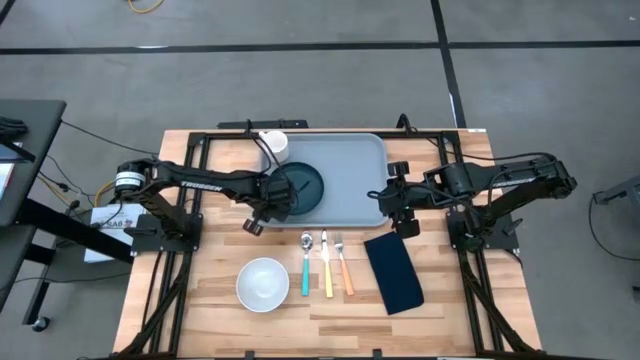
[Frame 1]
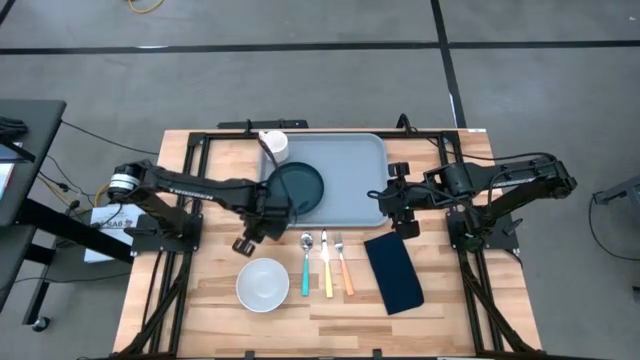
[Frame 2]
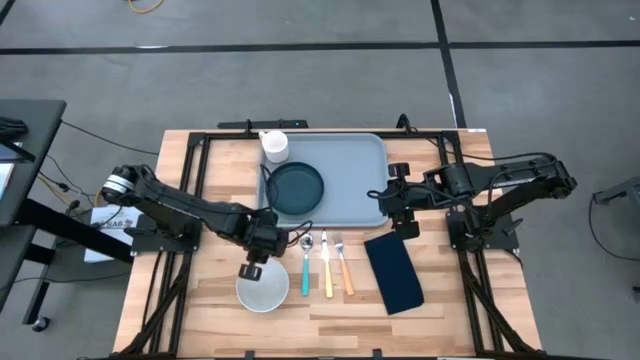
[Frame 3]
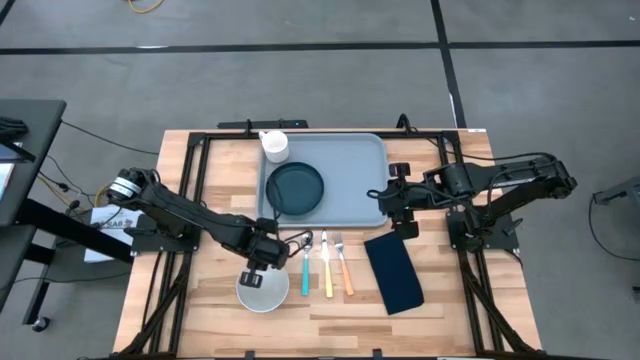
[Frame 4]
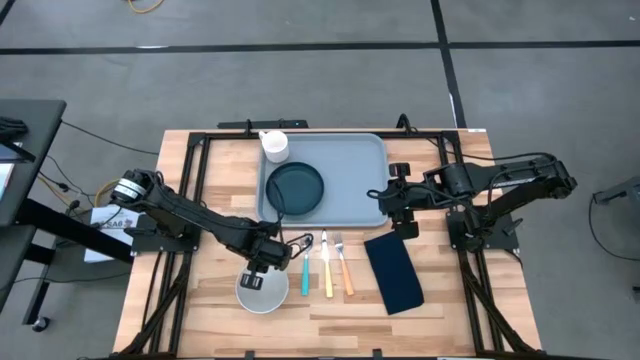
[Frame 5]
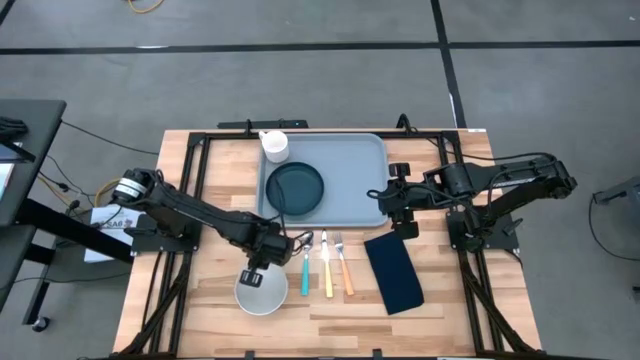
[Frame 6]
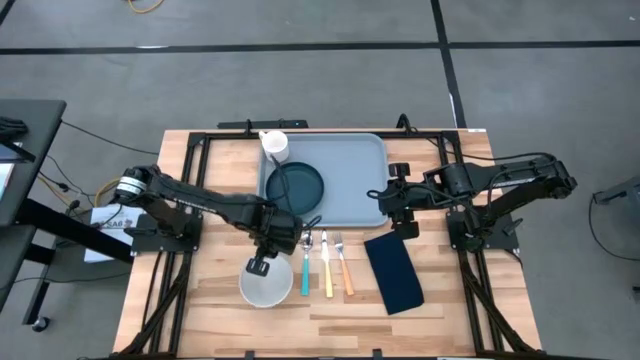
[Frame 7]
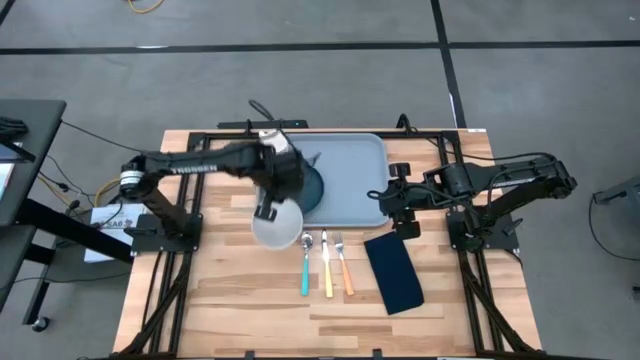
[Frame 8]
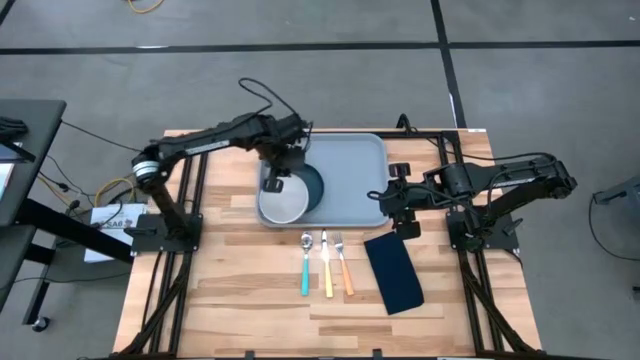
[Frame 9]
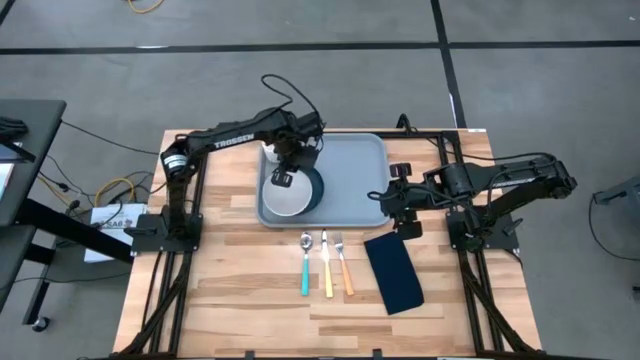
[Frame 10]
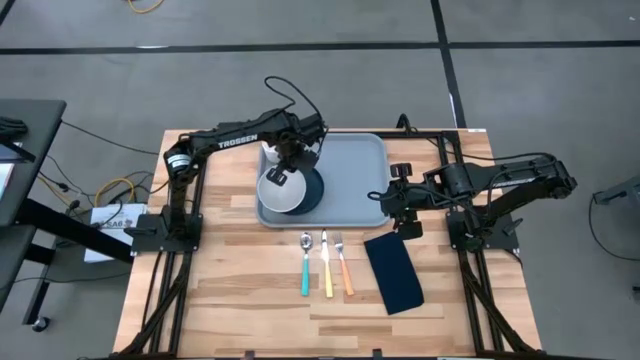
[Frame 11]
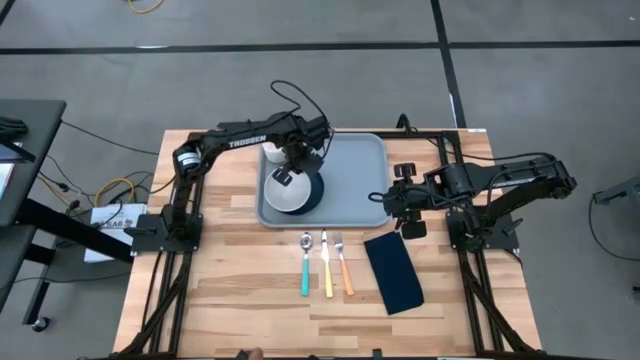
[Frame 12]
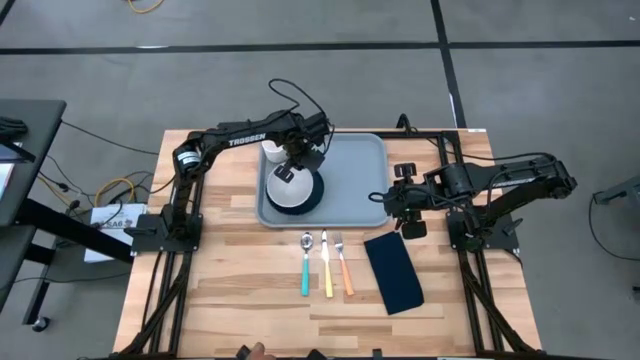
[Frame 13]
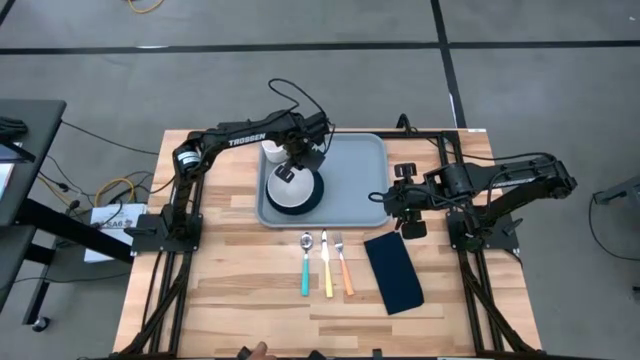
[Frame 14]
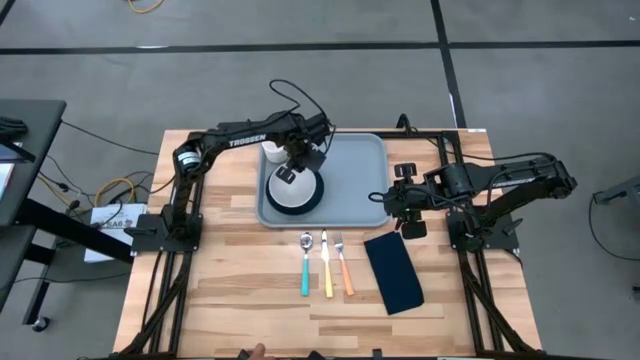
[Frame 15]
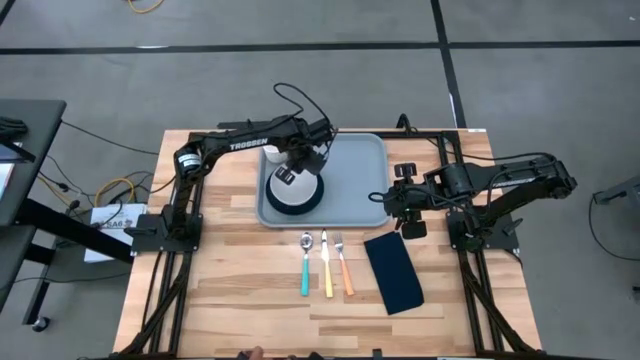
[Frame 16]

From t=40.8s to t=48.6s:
Task: Set up tray
Put the white bowl on the black plate

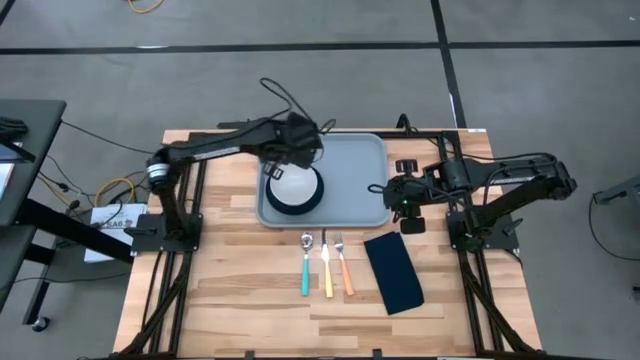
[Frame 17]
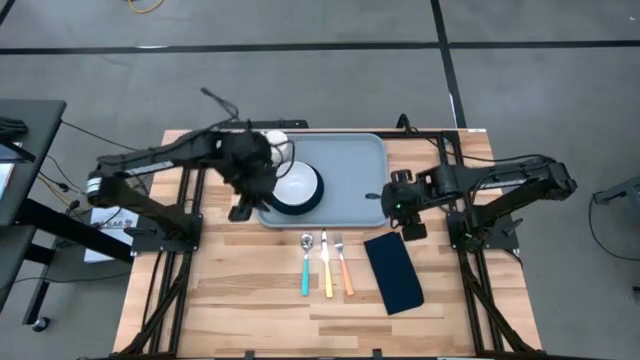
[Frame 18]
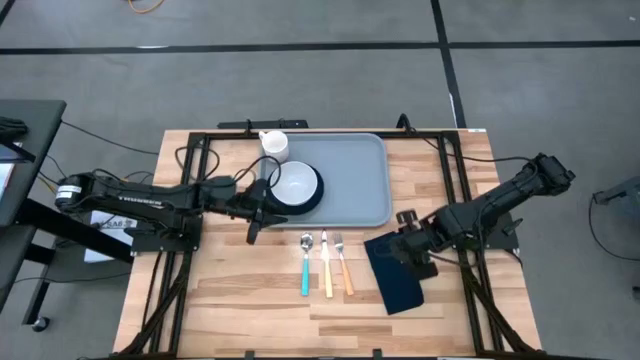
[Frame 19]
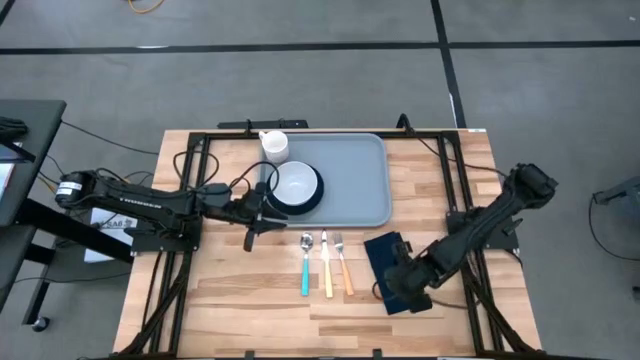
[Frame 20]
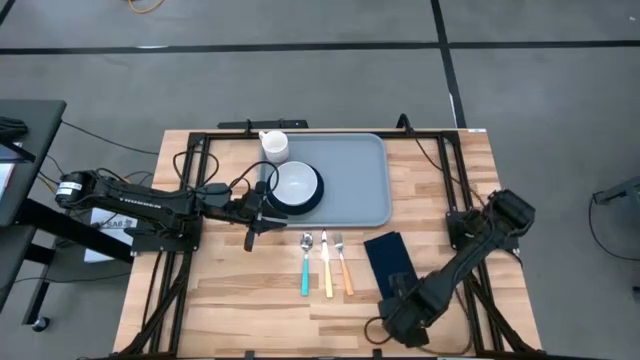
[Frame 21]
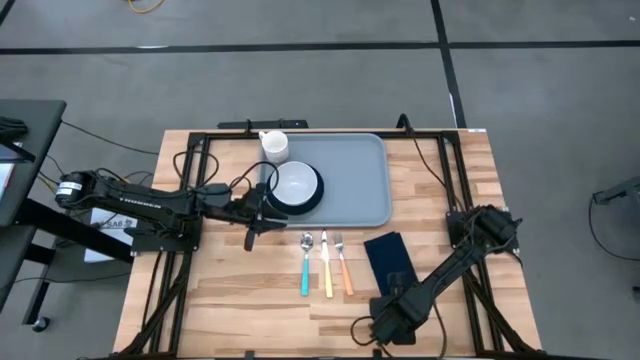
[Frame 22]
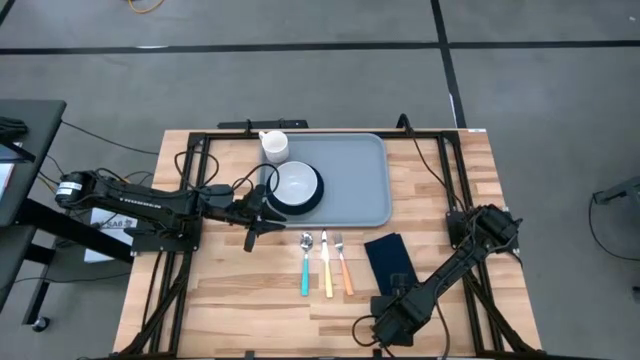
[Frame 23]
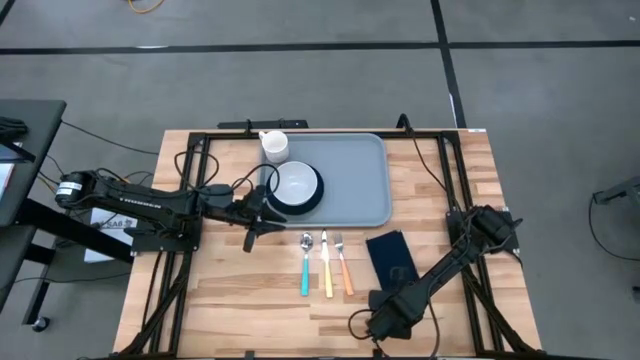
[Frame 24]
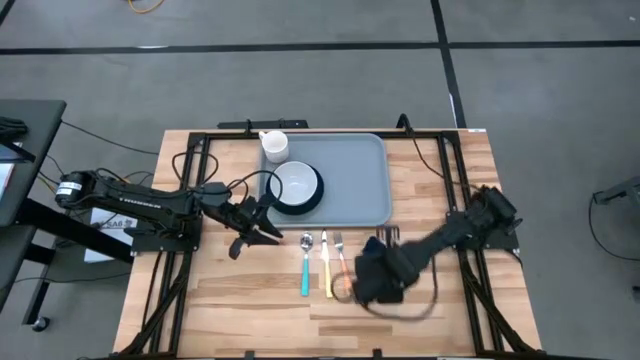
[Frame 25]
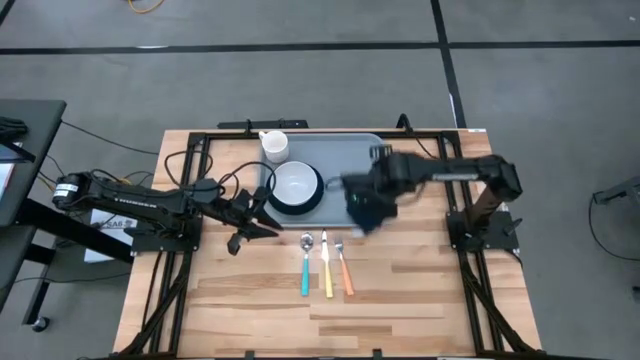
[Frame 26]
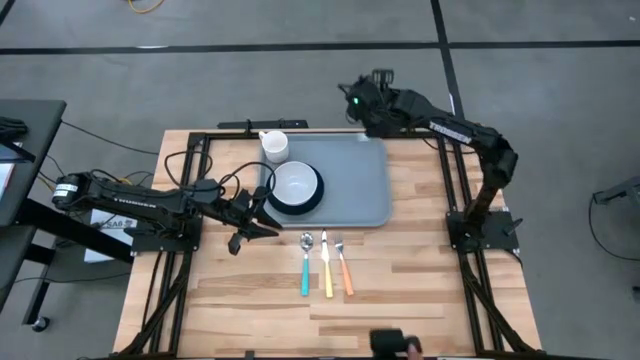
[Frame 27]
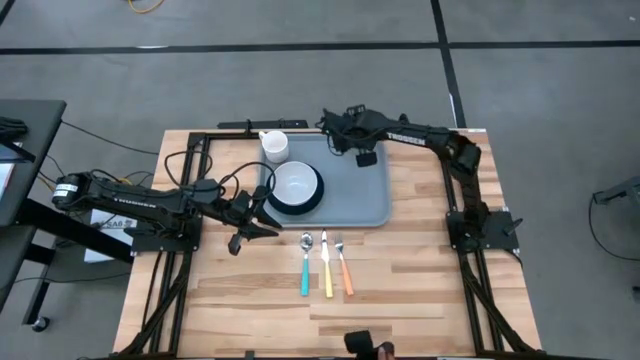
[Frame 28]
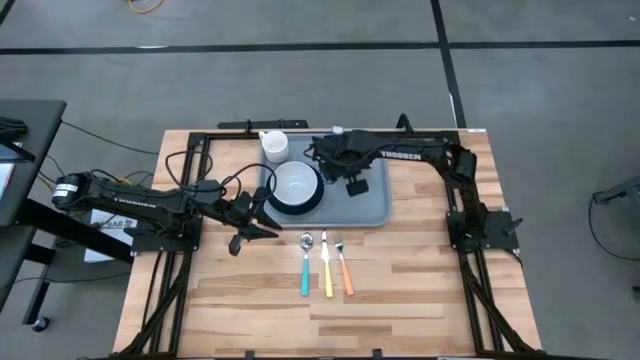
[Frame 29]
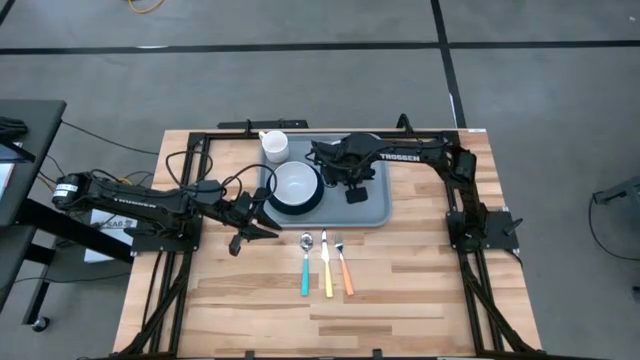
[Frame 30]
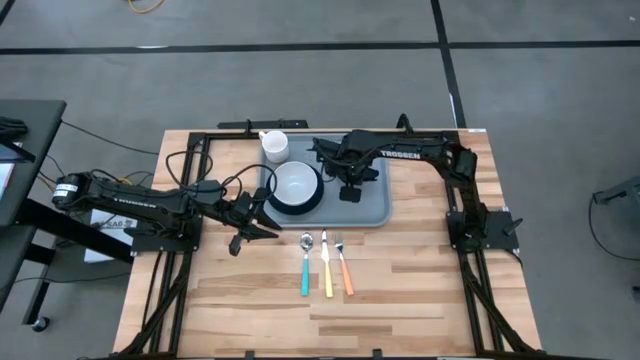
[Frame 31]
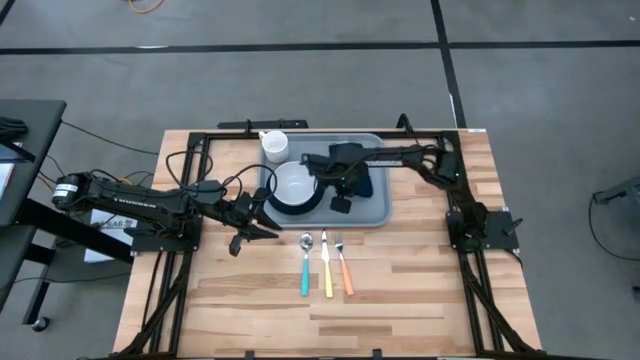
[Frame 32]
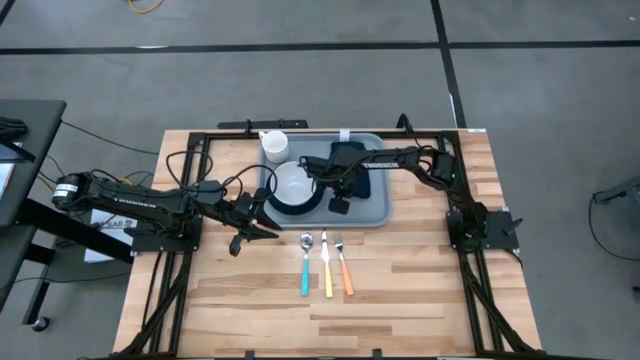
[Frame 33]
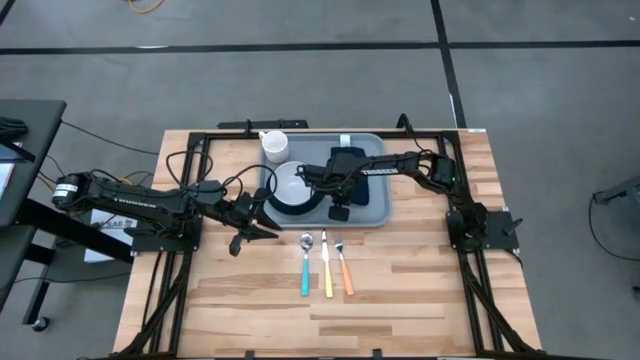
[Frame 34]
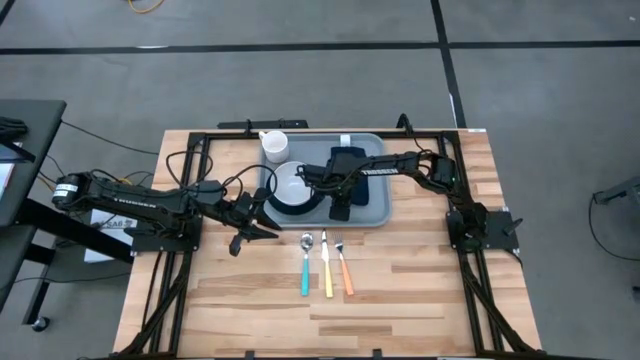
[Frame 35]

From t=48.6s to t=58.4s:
Put the dark blue napkin on the gray tray to the right of the black plate

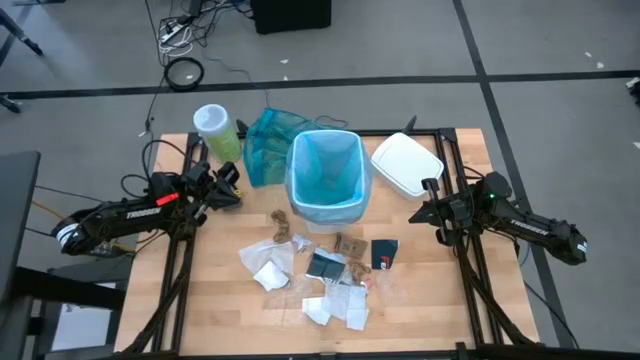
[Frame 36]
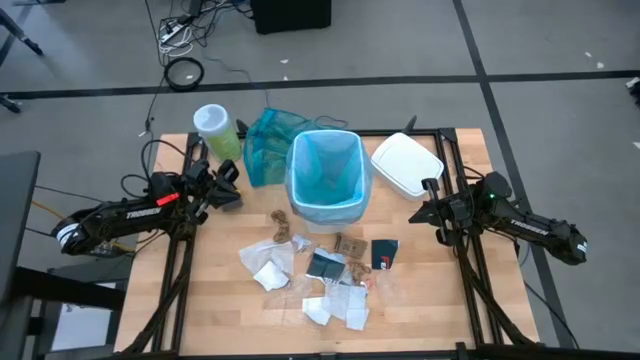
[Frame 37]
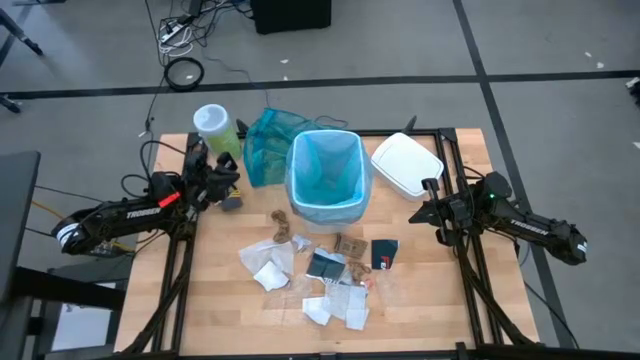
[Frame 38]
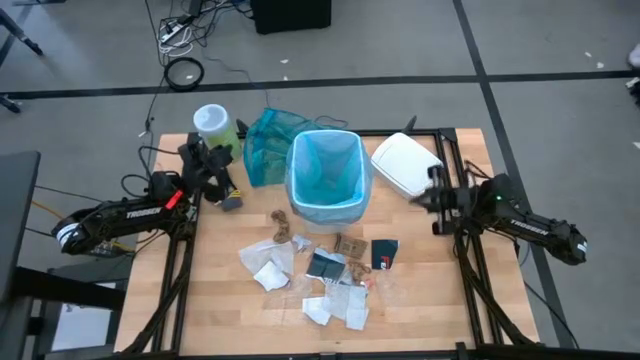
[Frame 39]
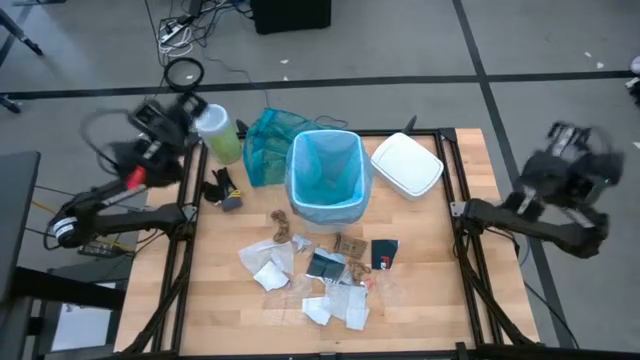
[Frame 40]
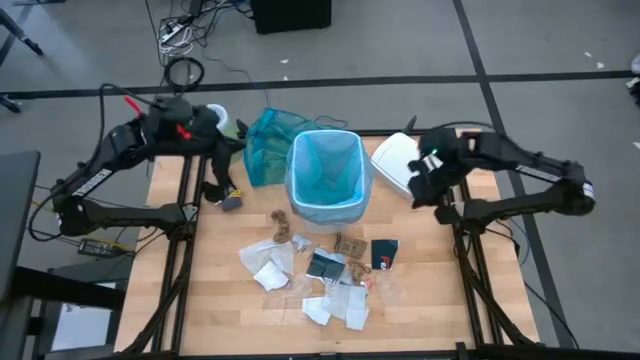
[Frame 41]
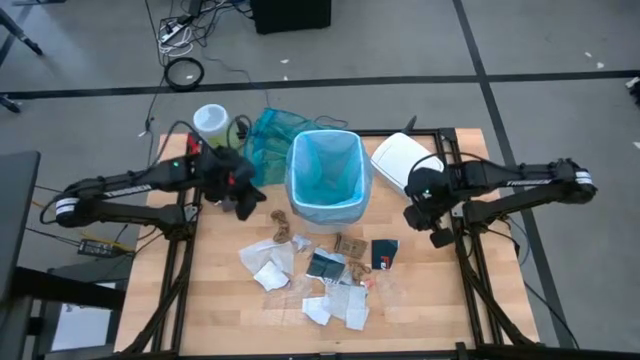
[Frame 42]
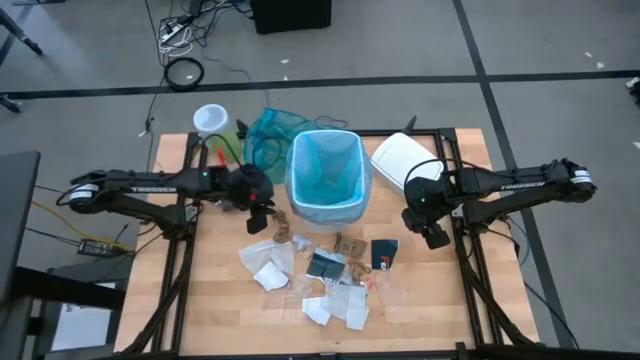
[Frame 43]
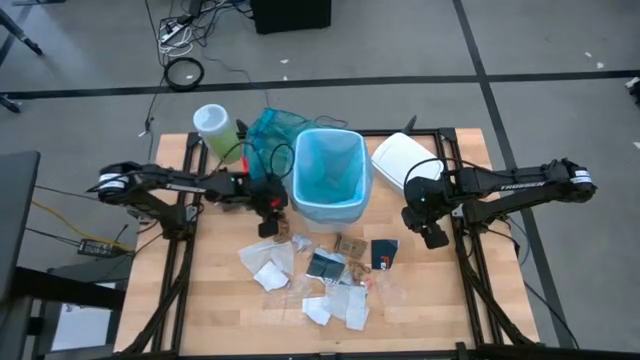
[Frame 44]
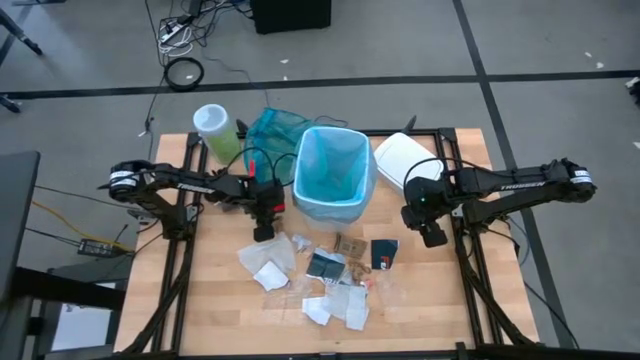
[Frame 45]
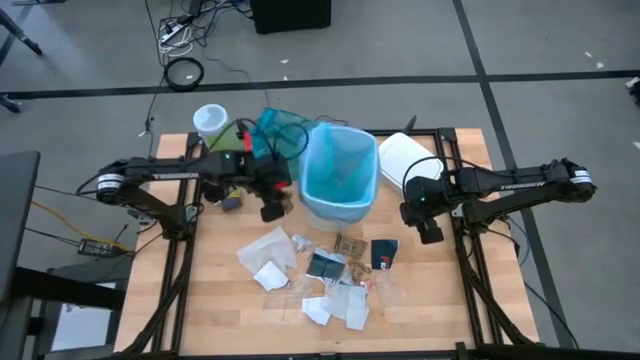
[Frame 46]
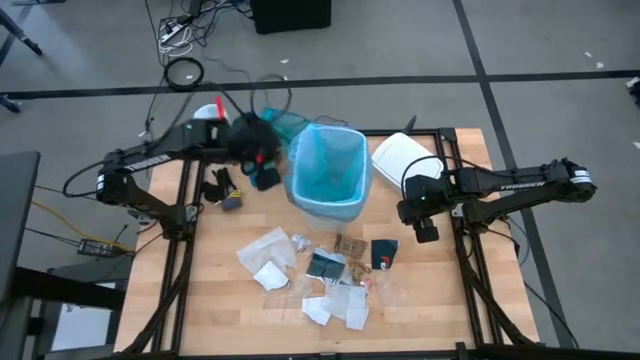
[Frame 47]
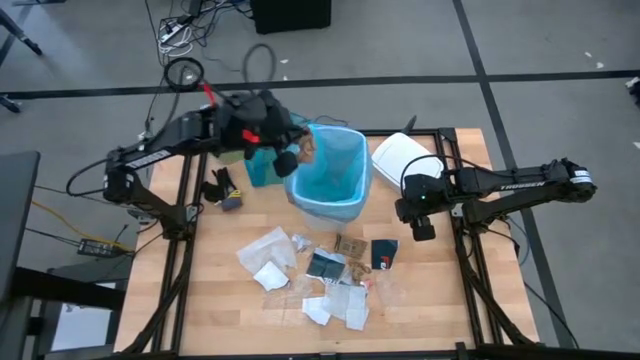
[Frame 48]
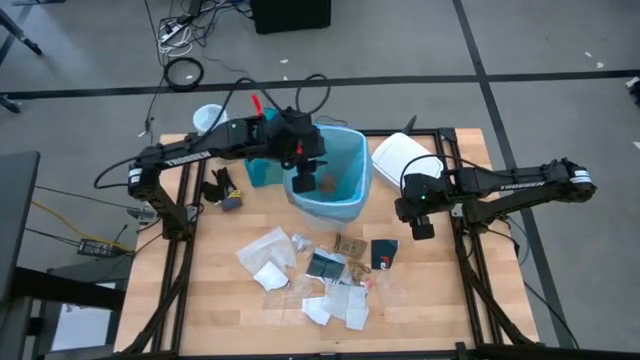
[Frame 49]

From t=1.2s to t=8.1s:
Task: place trash/remove bag and relplace
Put the brown paper into the white trash bin
